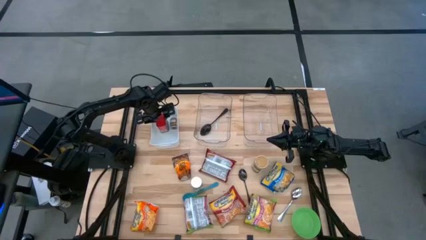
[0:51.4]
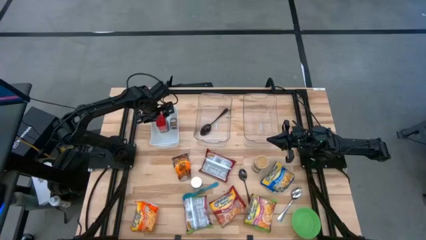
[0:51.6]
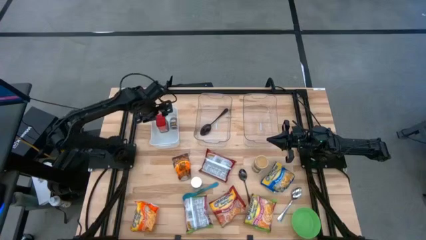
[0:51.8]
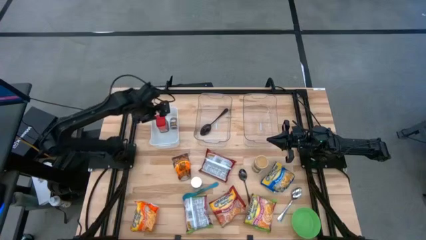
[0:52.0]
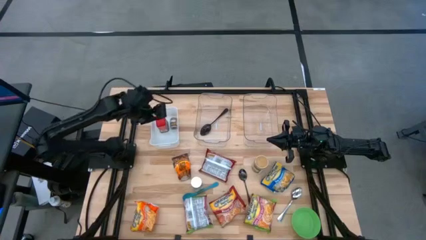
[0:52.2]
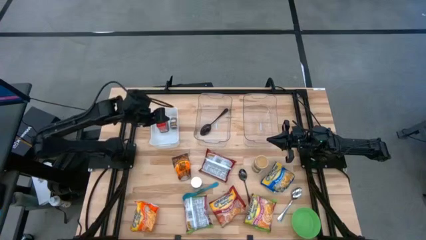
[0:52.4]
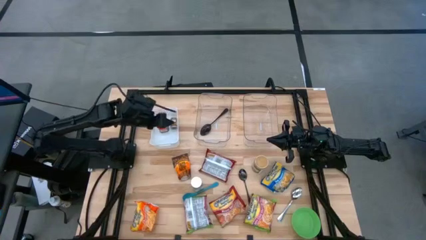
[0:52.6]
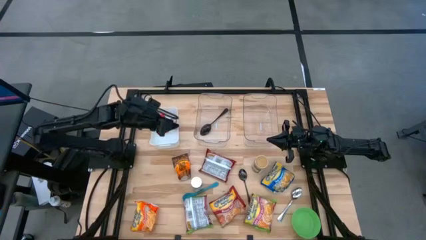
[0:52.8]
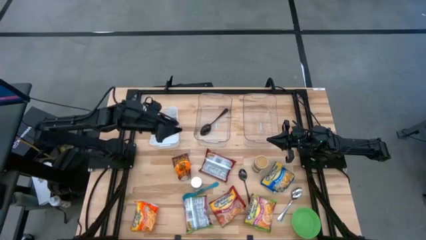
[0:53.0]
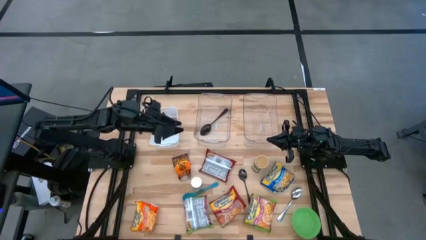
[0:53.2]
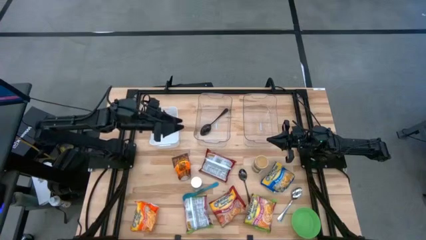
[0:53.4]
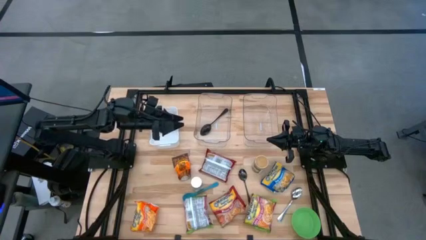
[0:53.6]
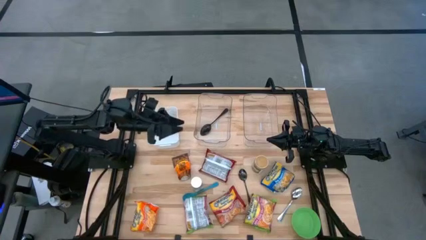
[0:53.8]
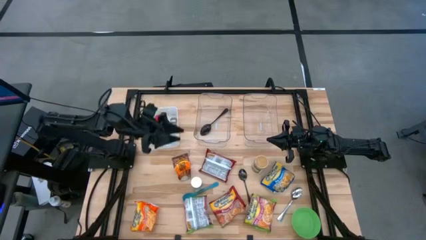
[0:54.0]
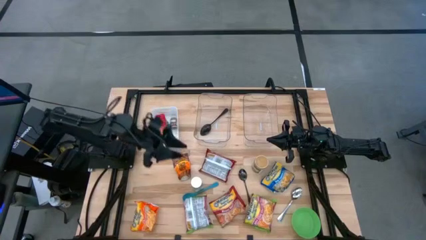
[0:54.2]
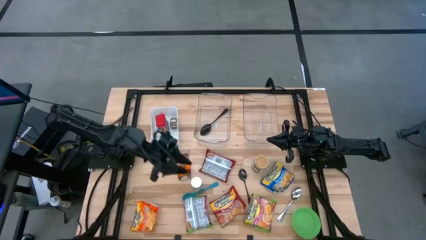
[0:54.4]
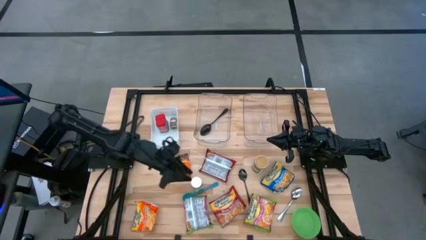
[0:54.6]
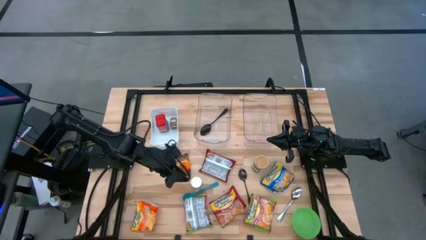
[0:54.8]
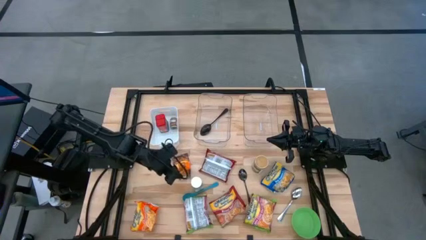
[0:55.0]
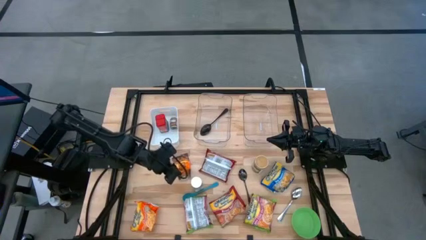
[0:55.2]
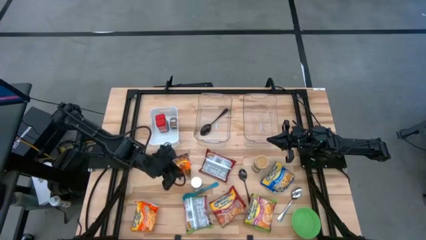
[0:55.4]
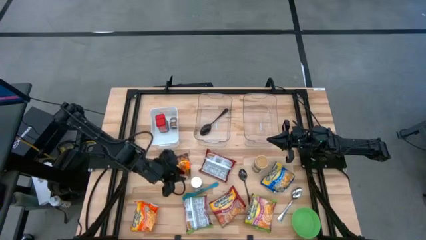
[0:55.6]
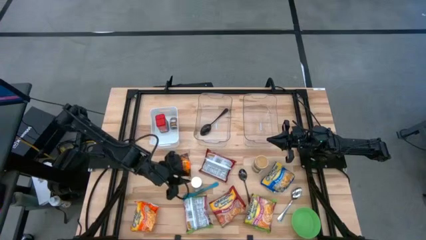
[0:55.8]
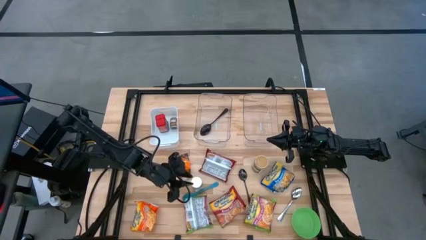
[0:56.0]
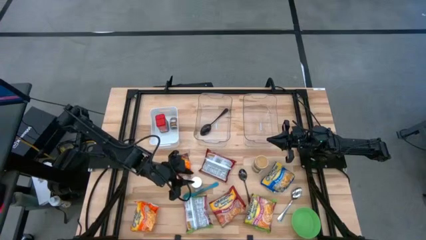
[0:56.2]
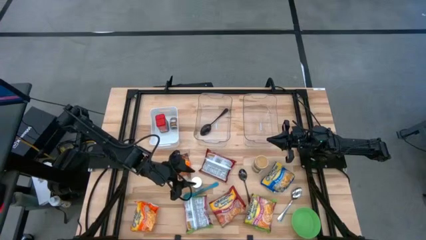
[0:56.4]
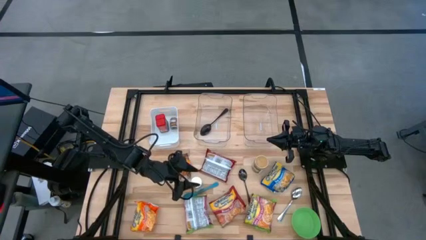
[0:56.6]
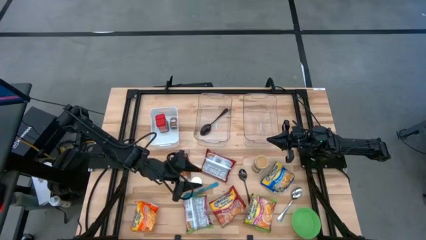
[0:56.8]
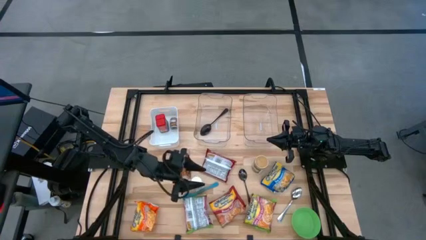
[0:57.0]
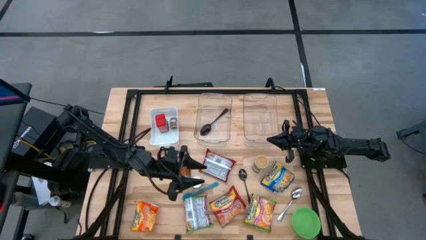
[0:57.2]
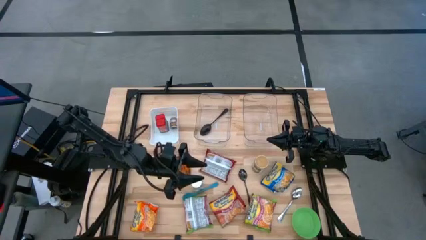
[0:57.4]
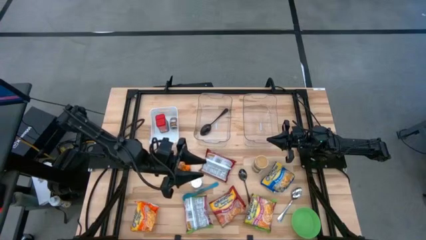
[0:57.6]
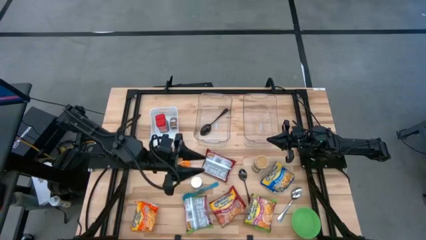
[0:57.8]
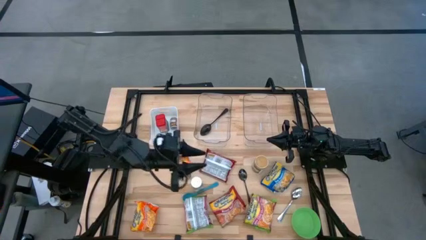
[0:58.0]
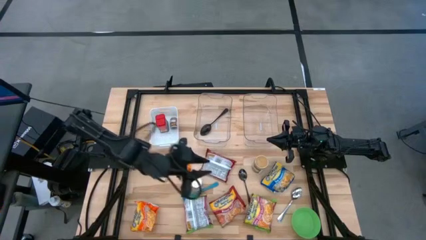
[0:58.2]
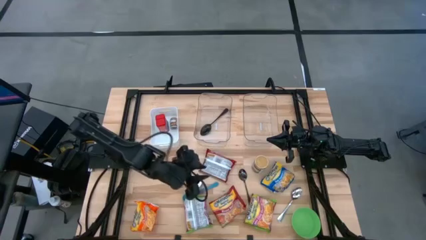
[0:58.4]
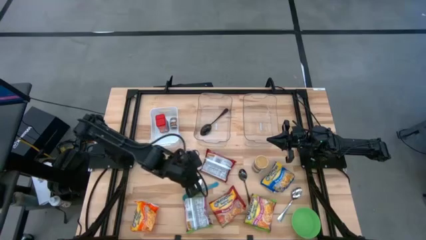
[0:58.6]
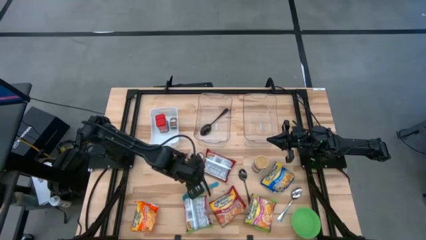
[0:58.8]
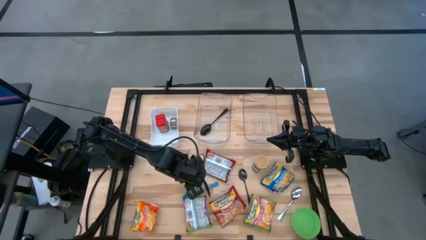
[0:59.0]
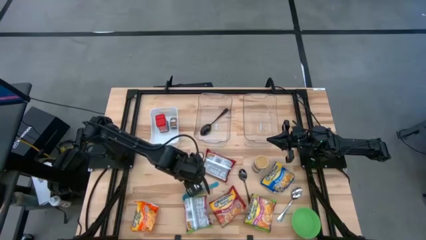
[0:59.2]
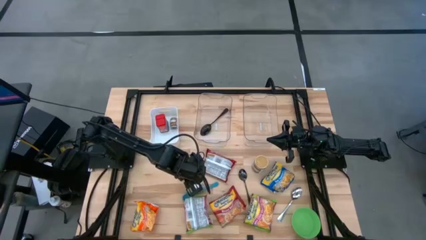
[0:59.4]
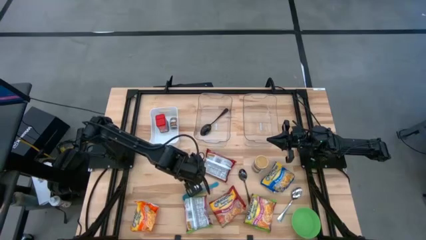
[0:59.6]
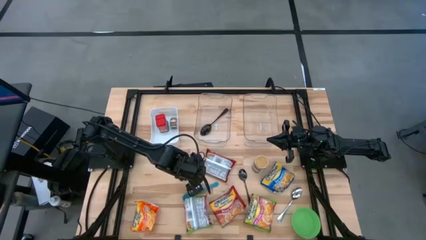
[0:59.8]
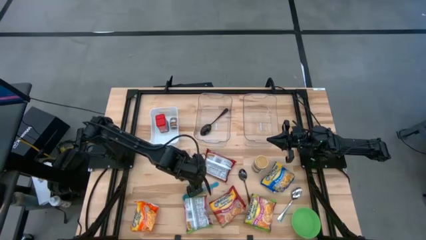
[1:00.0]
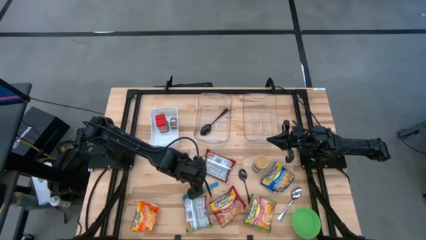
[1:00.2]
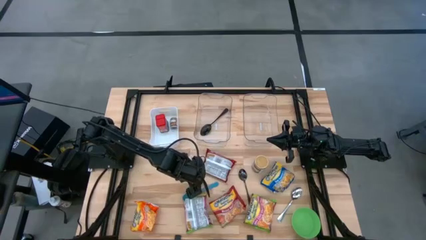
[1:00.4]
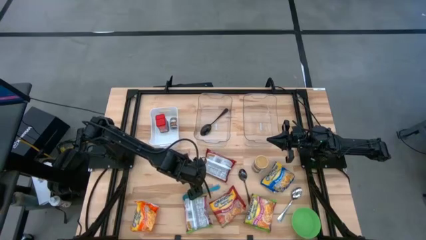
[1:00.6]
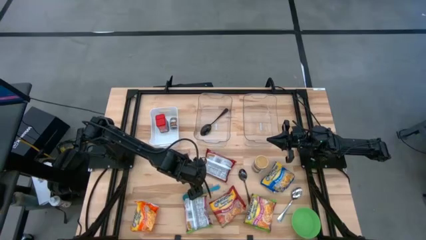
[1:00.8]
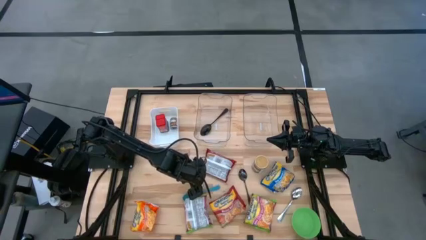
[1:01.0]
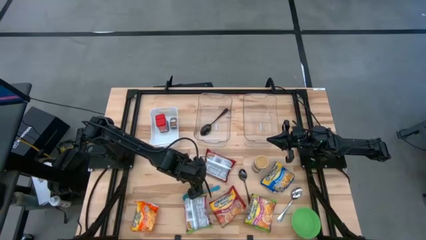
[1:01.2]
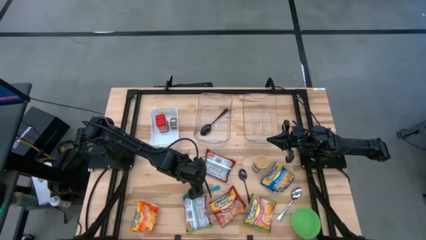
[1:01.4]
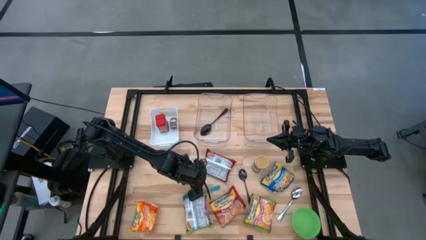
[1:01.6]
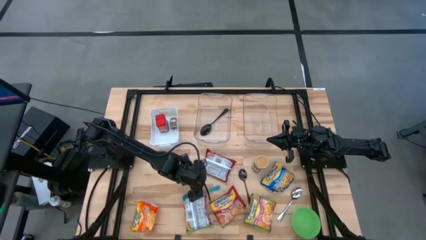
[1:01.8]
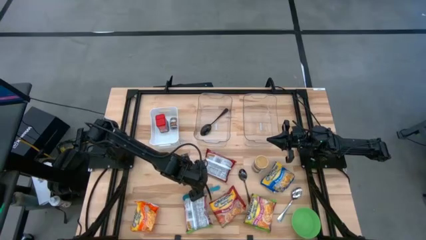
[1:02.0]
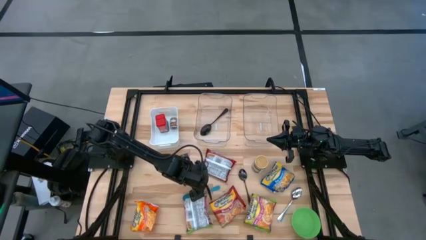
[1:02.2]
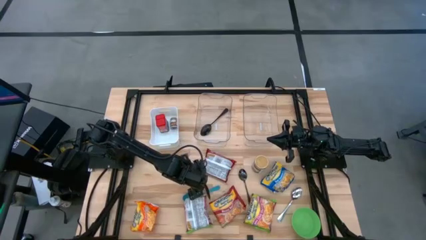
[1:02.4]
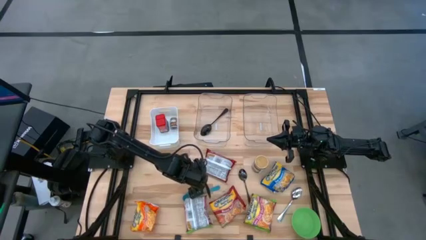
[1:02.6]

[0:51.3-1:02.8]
Task: Pick & Place Food Item
Put the white seasoning bottle into the white bin

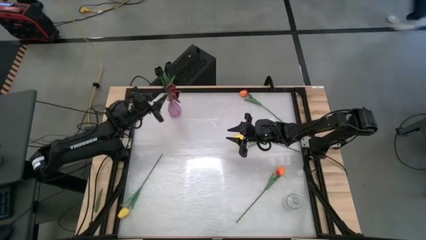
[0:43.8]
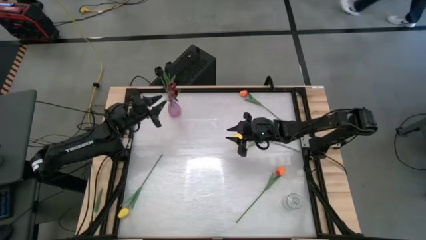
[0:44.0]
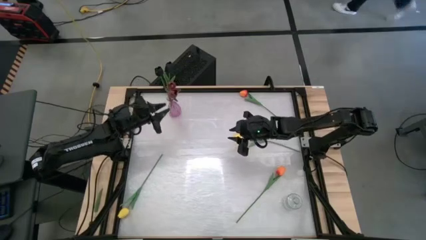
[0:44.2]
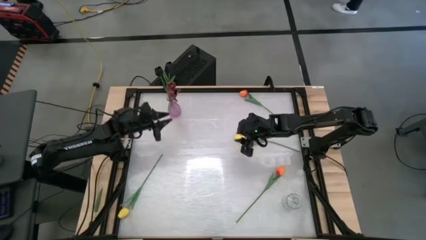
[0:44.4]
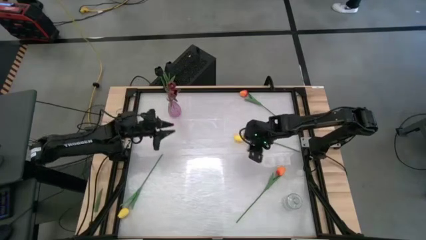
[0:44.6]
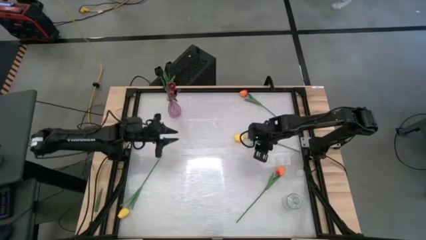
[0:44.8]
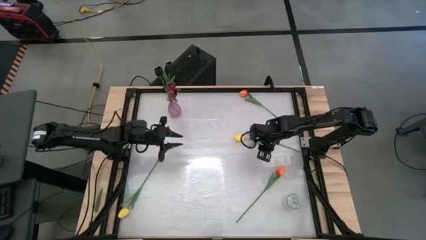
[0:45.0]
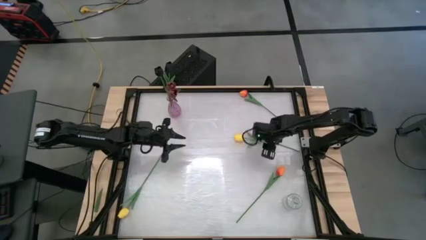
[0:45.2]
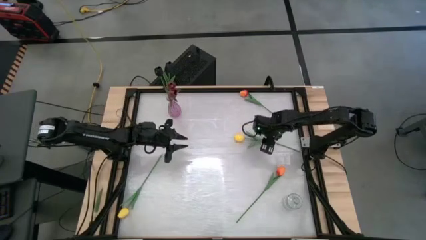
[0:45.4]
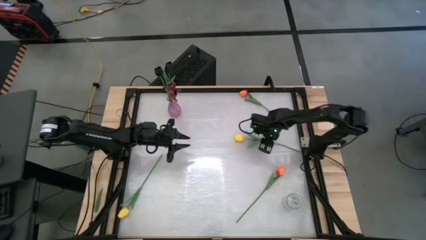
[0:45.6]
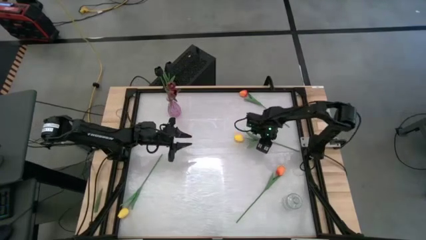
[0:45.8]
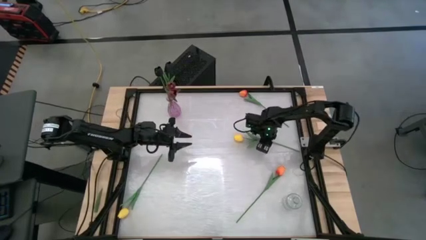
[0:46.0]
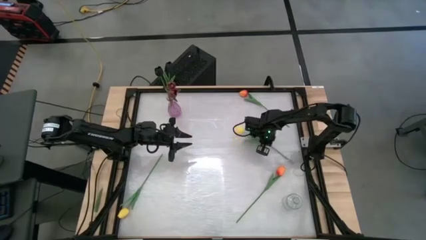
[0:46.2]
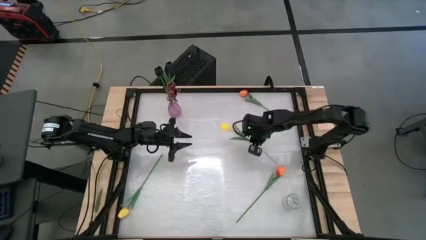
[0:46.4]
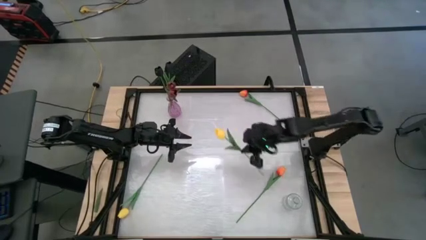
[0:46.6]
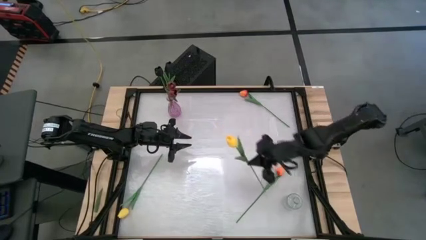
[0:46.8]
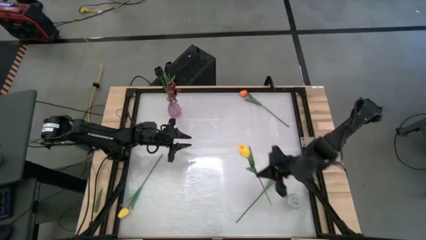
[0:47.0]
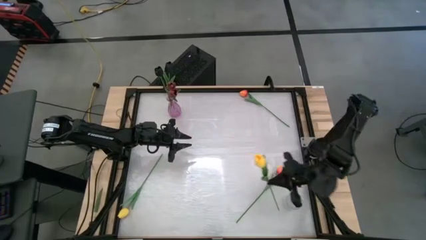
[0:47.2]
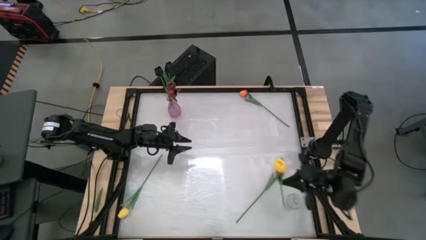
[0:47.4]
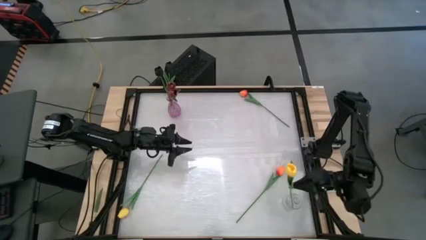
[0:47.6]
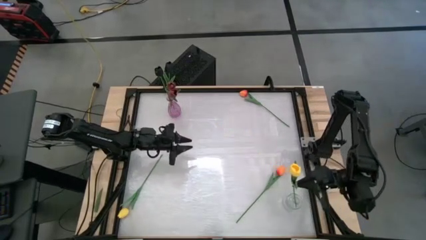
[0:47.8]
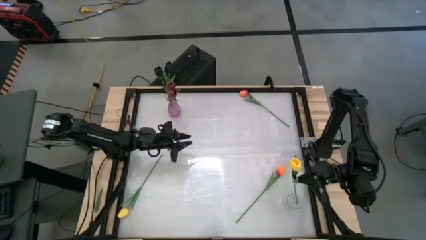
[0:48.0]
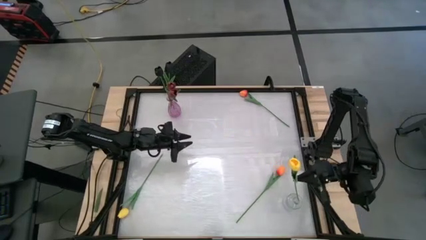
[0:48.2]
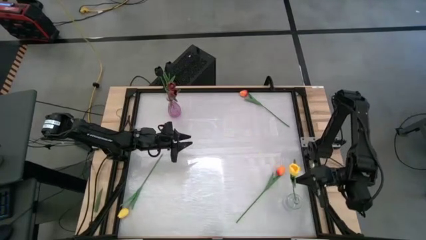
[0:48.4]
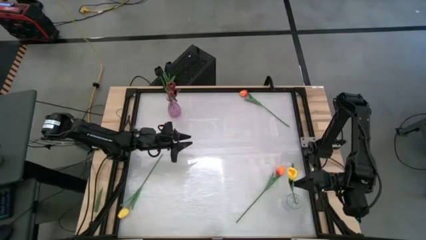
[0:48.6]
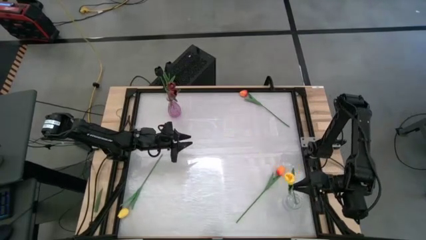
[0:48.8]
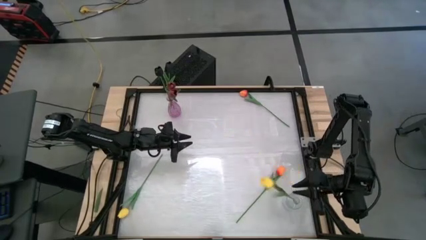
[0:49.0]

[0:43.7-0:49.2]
Task: Sort flowers into vase by color
Put the right yellow flower into the transparent vase
